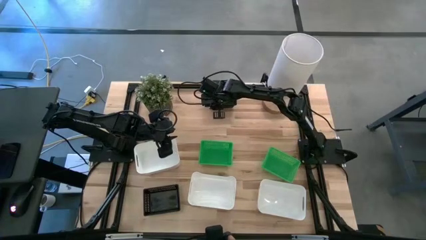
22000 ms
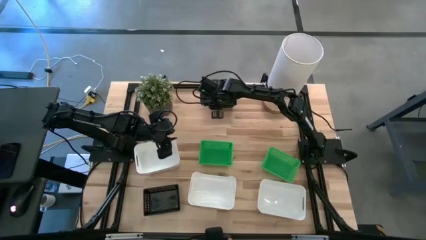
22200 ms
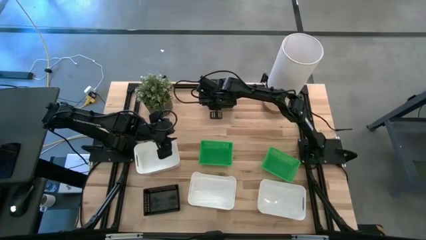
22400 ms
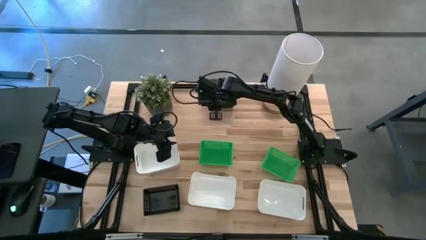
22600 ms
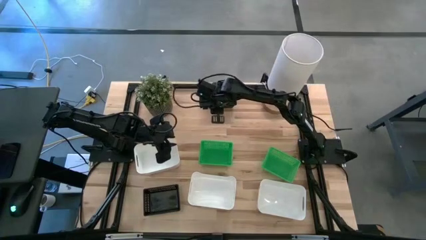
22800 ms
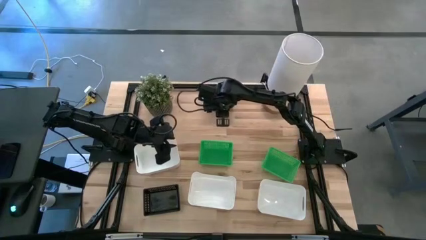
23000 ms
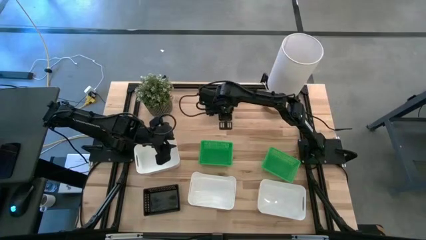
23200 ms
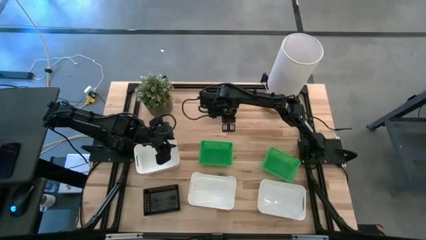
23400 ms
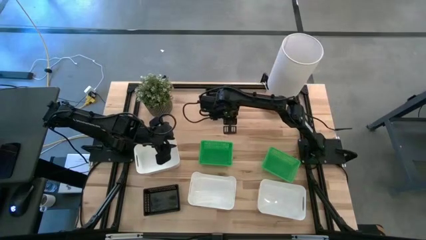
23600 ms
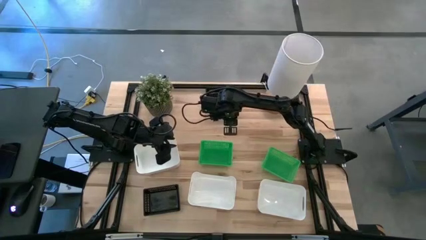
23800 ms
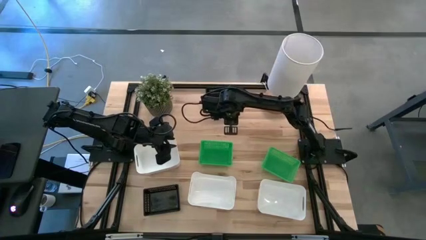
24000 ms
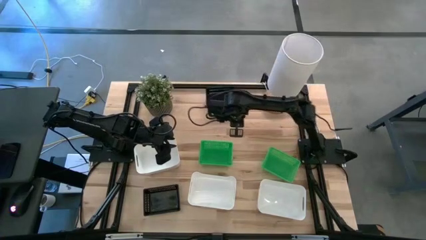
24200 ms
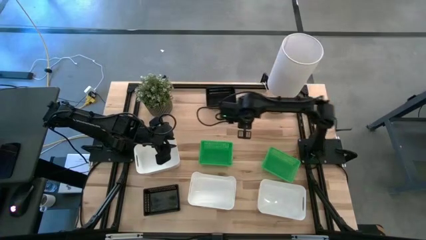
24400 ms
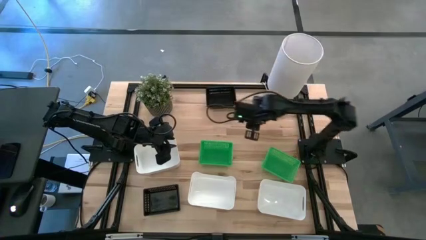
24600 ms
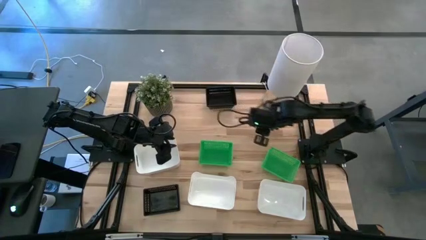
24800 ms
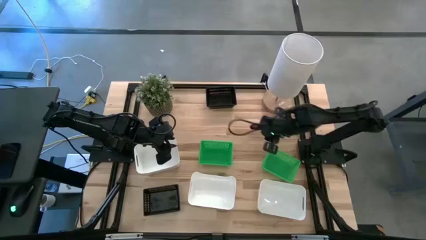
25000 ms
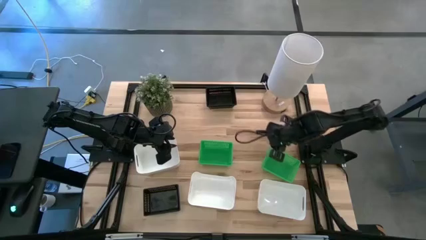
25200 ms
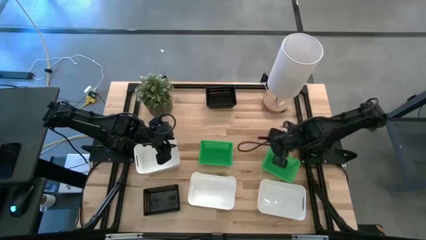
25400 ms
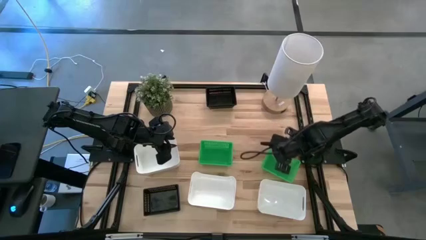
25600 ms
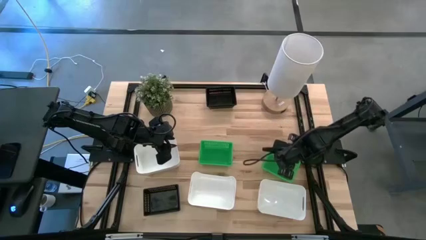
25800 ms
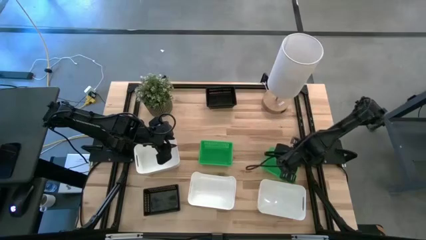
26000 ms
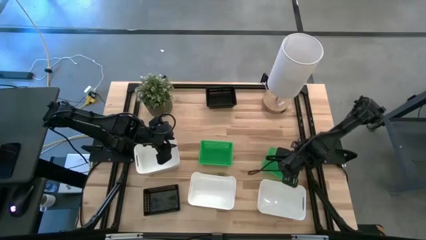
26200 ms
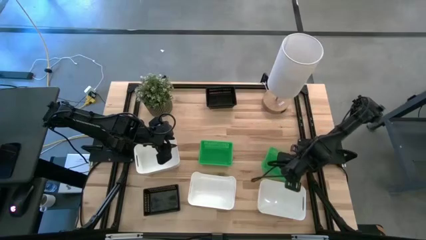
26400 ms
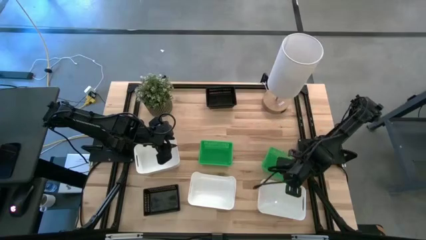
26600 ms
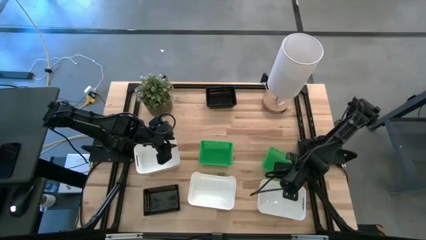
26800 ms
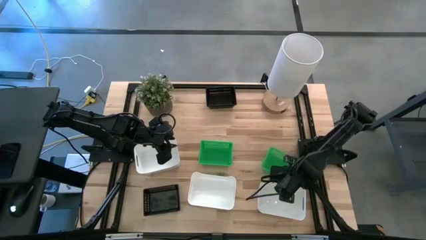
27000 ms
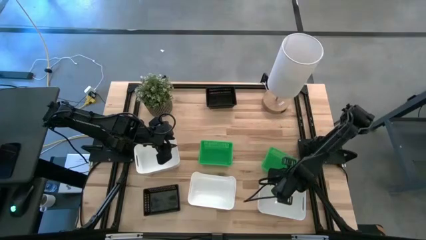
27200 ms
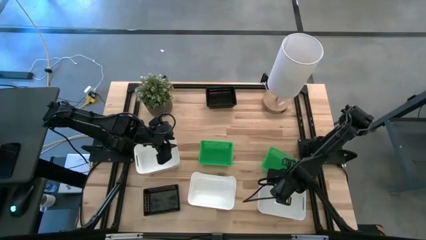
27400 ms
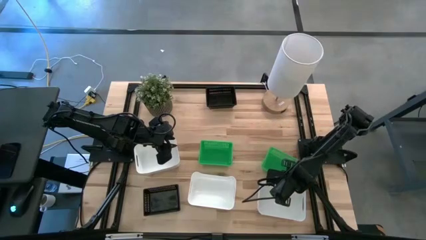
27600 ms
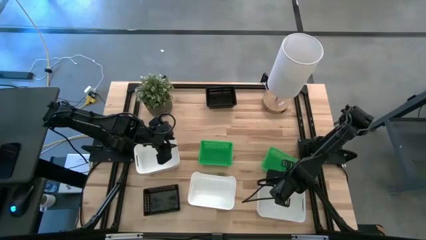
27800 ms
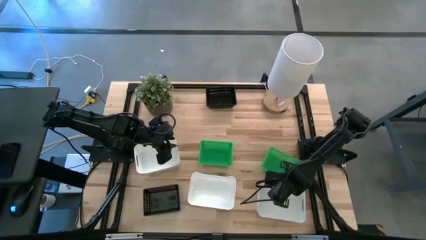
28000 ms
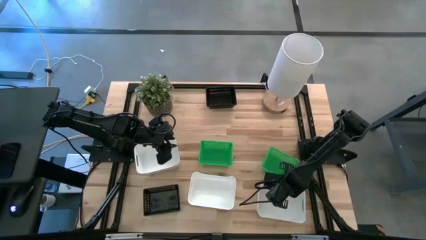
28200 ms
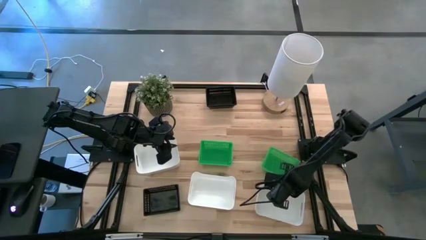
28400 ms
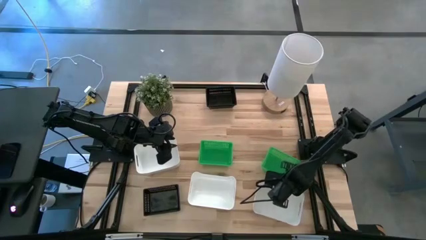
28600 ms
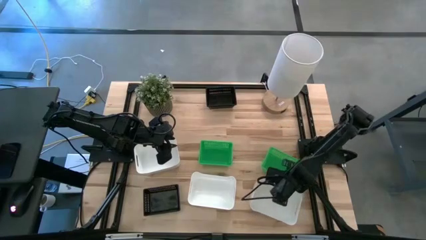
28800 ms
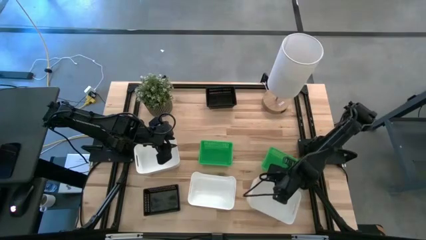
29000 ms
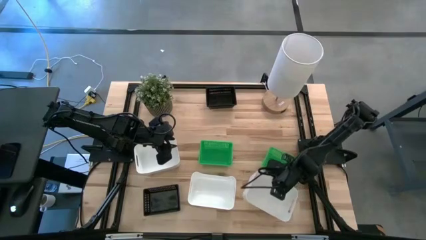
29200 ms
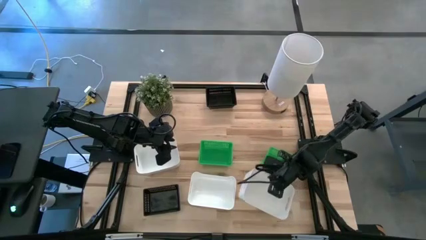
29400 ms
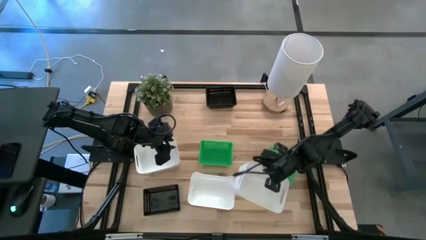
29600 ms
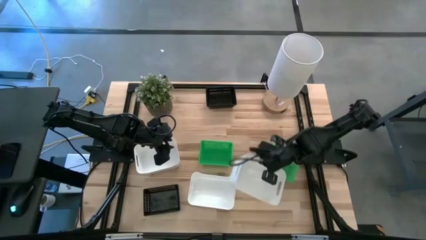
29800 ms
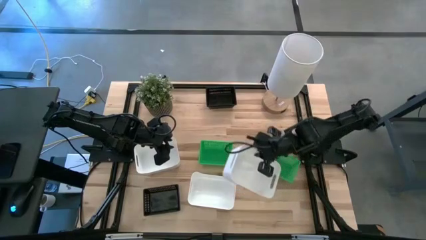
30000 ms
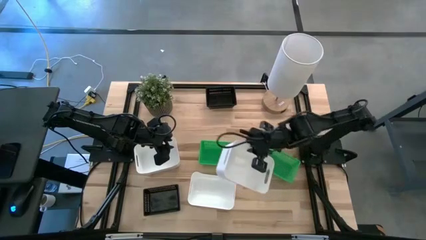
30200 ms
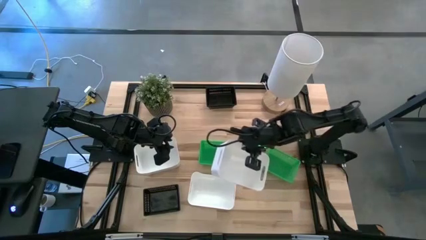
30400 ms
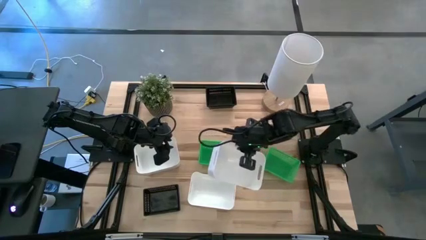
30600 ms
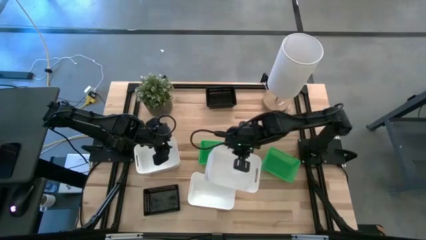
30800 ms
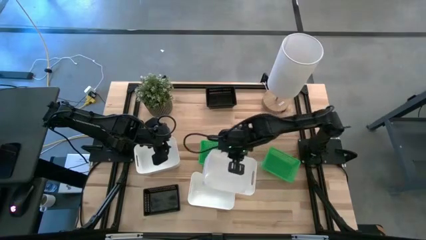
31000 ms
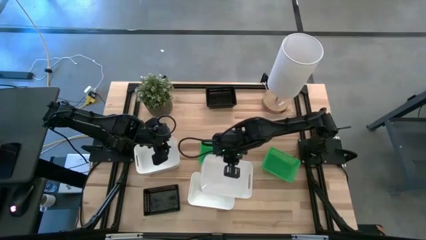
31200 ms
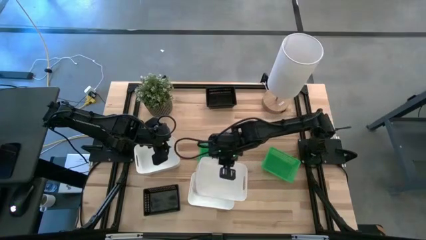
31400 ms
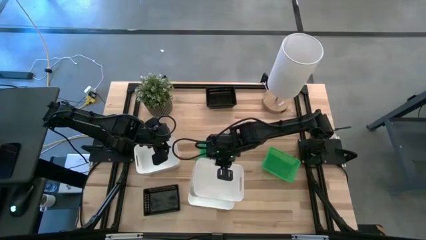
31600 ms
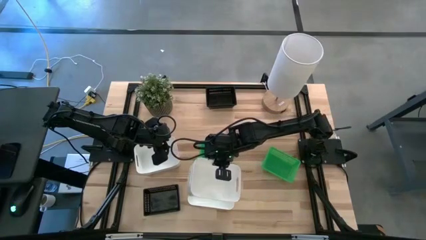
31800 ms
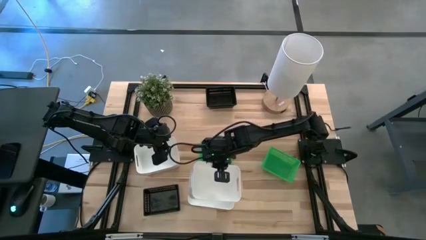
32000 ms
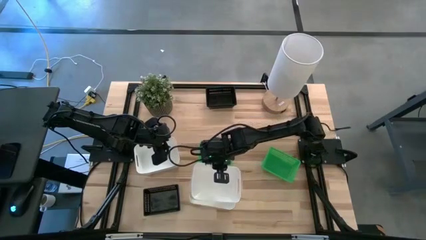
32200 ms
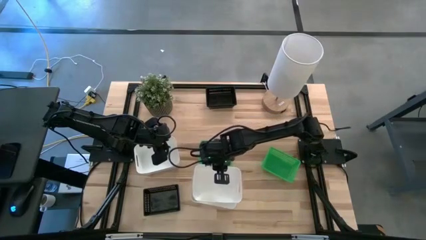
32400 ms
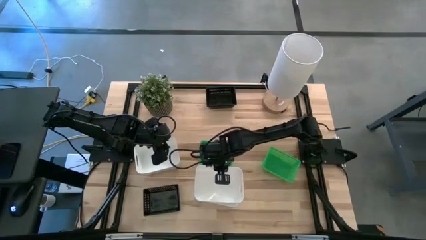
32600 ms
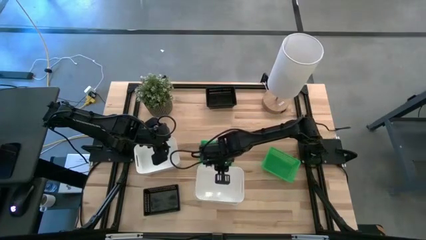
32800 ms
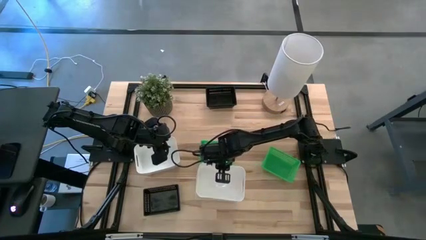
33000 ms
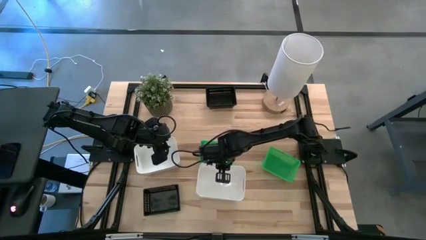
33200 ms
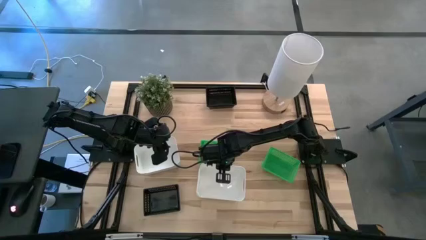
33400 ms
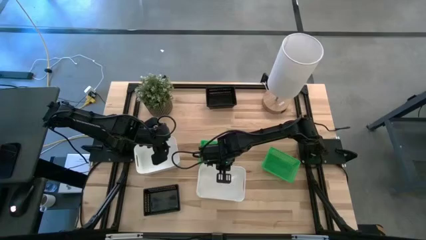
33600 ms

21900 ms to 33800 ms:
Stack the right white bin on the middle white bin

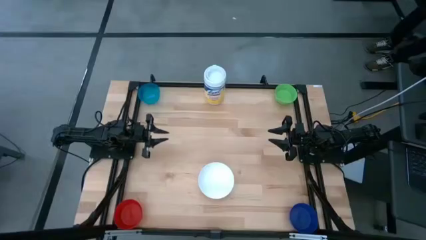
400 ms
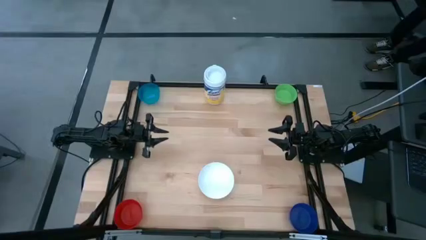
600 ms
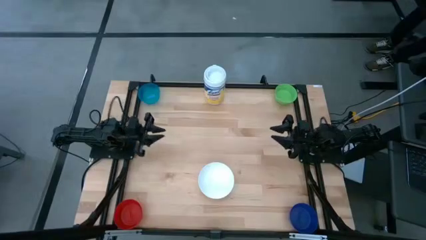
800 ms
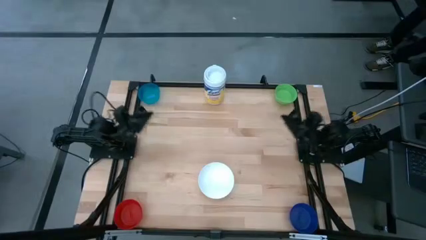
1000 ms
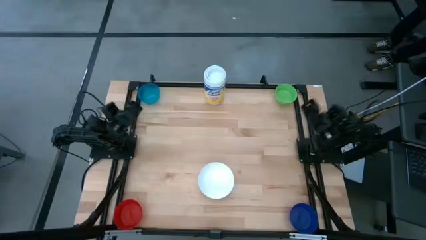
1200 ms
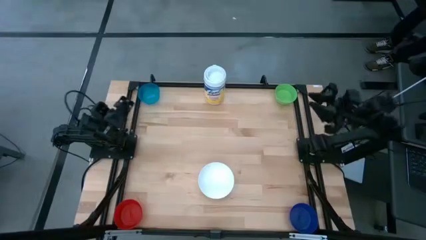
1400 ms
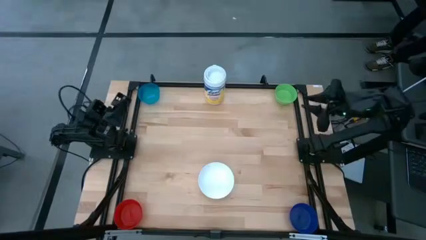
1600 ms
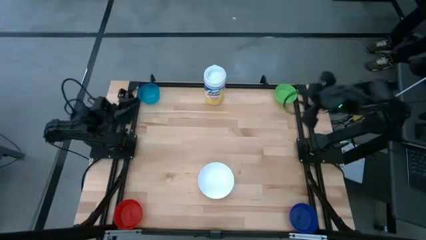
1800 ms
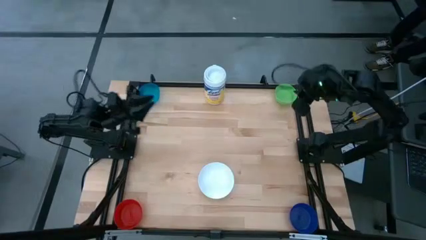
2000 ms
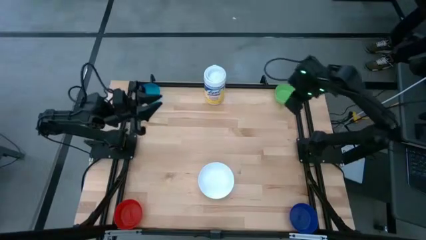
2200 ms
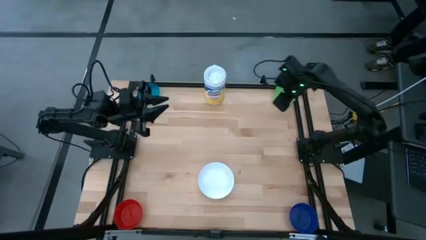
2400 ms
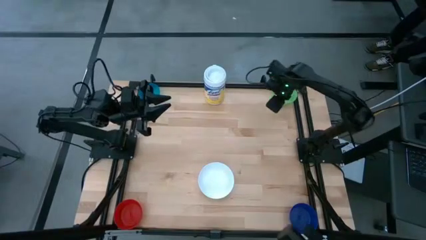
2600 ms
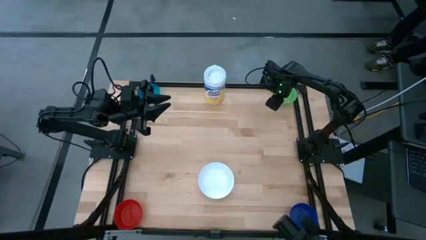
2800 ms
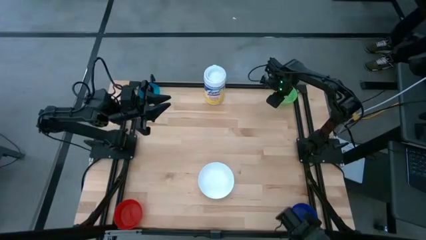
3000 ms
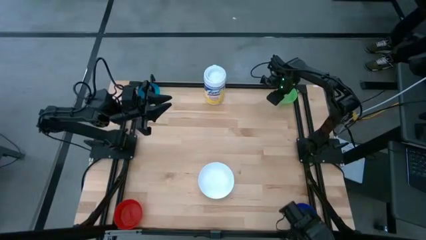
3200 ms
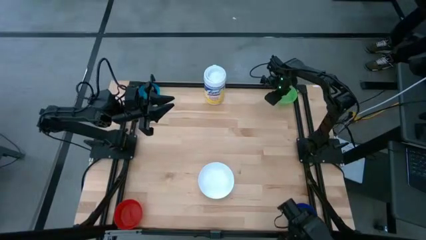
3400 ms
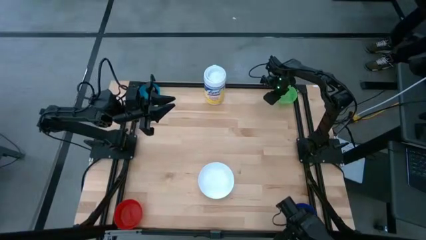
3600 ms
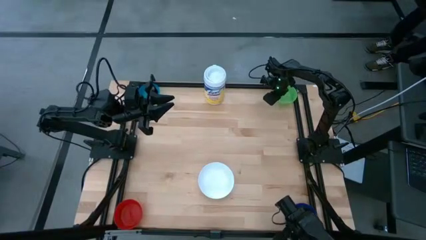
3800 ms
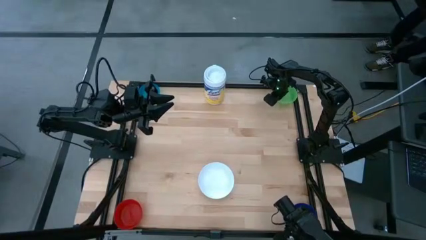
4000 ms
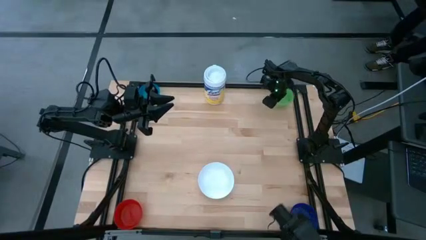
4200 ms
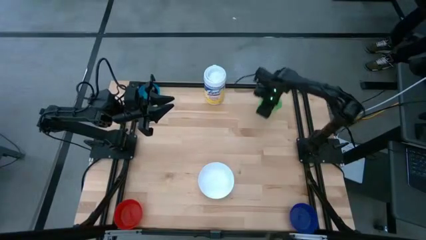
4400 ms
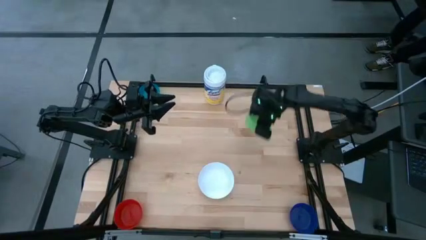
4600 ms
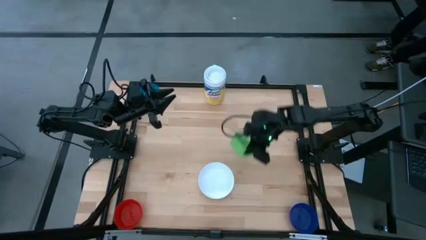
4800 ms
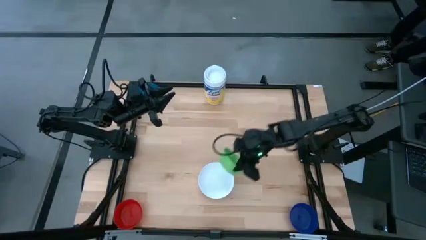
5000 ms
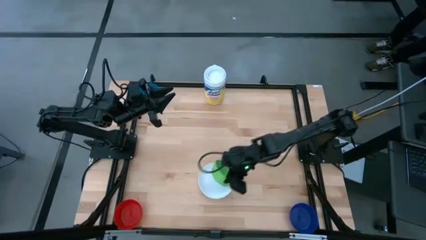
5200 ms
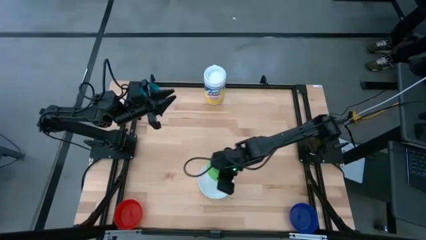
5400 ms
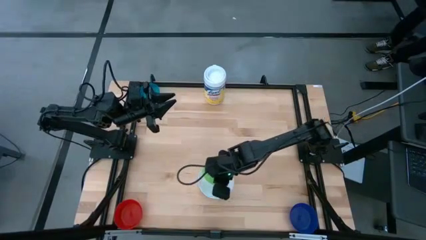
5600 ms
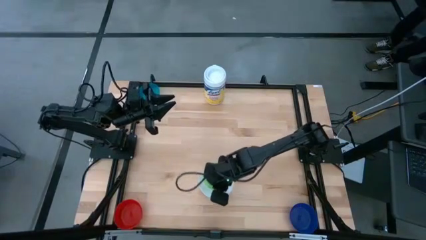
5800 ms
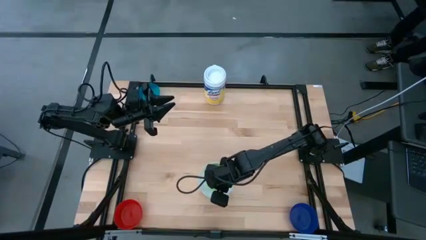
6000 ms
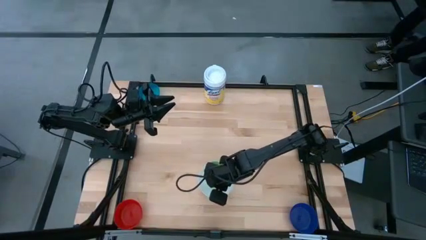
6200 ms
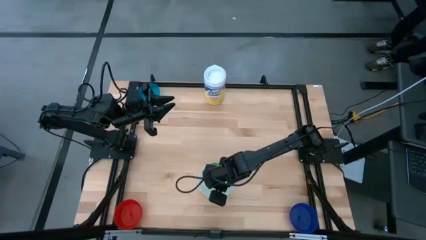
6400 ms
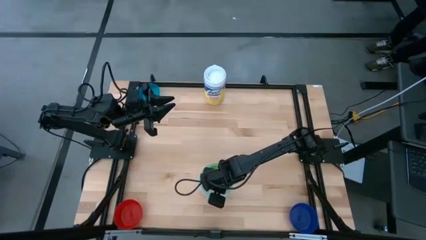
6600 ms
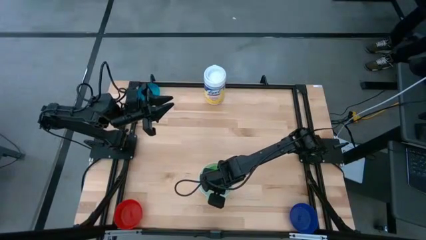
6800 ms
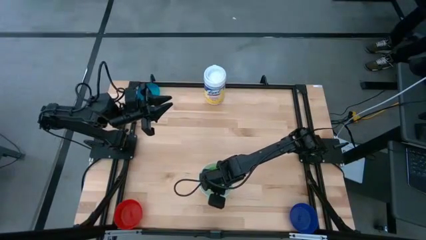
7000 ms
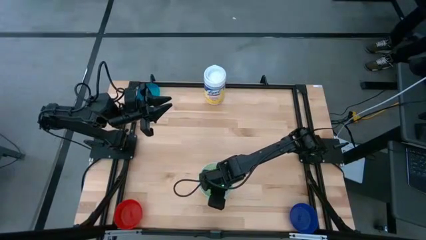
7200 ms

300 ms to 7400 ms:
Stack the green bowl on the top of the white bowl
